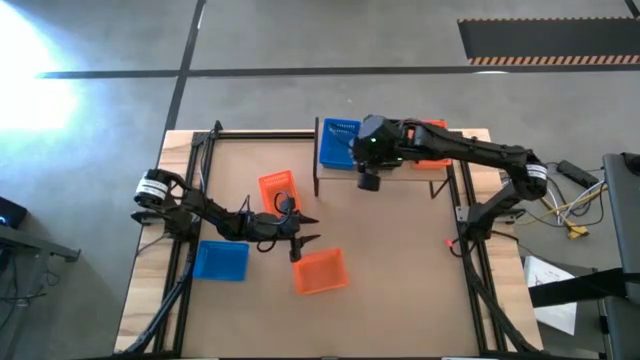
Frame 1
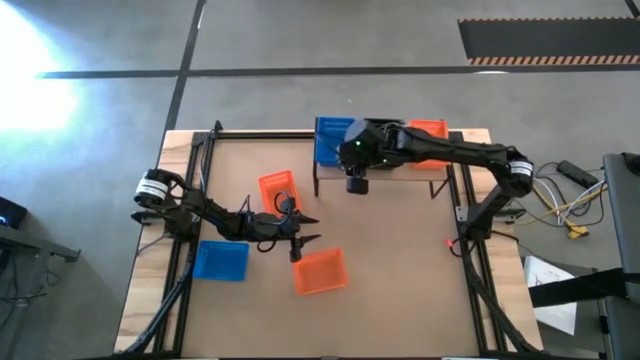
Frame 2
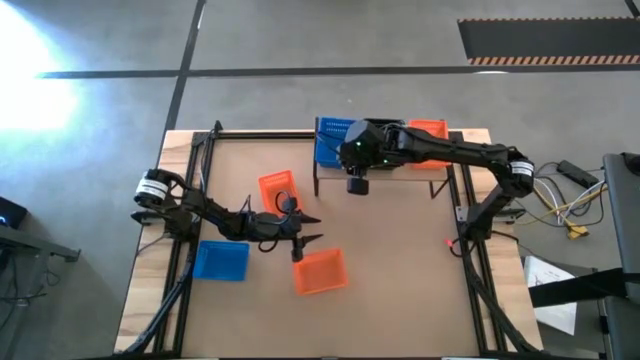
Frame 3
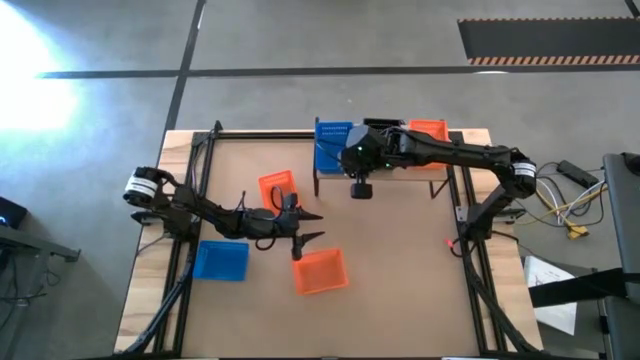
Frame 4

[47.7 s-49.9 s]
Task: Stack baskets on shelf by color
Adjust the stacked blue bins on the shelf

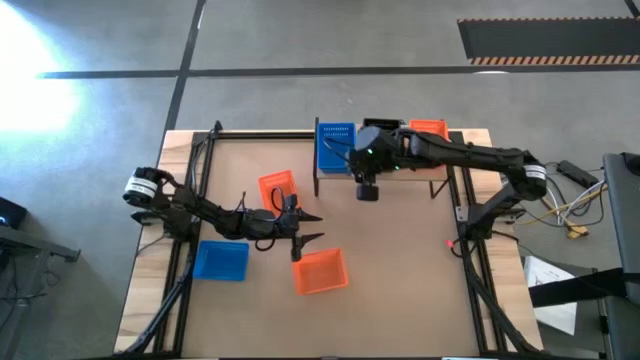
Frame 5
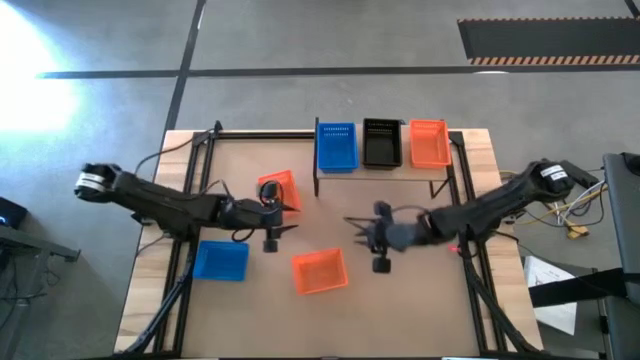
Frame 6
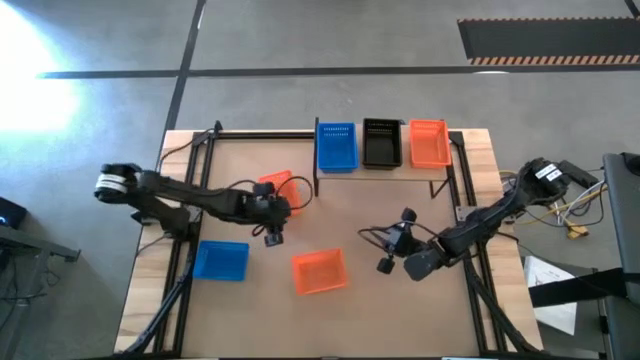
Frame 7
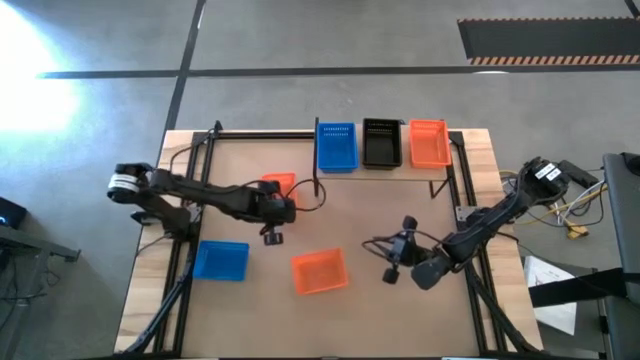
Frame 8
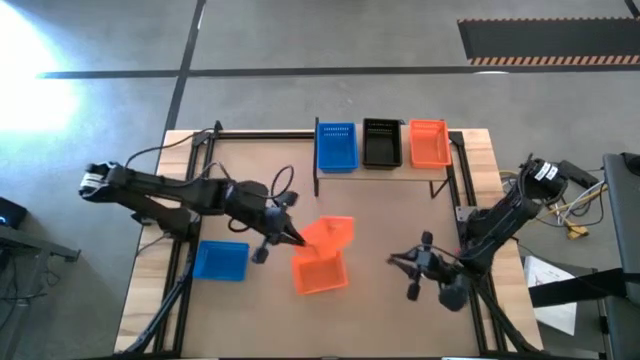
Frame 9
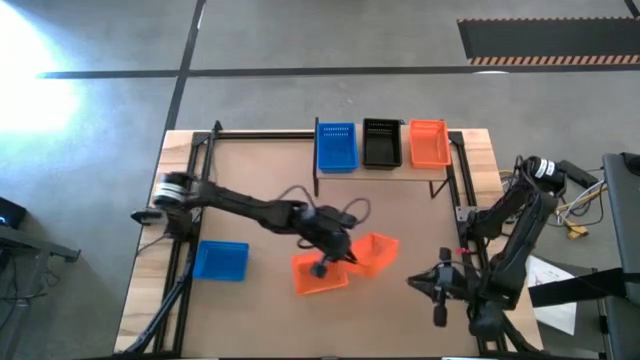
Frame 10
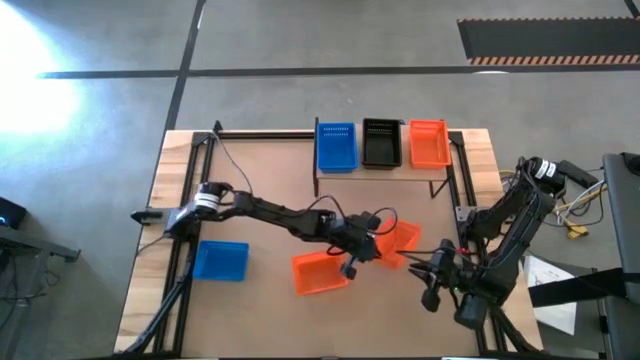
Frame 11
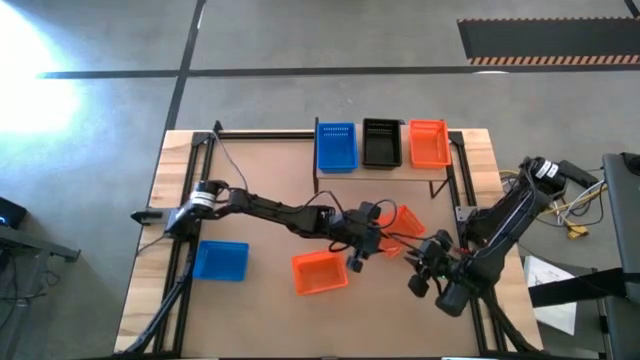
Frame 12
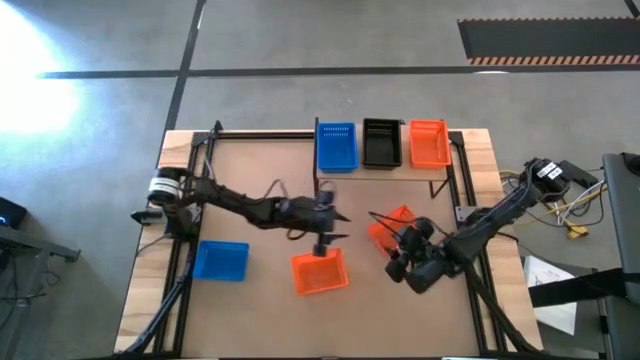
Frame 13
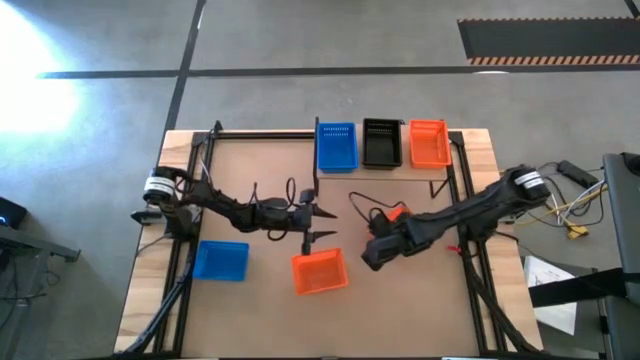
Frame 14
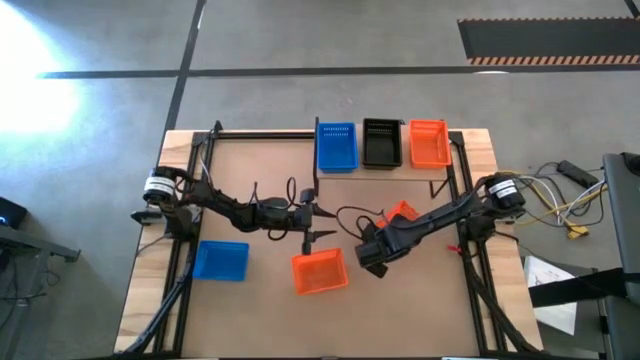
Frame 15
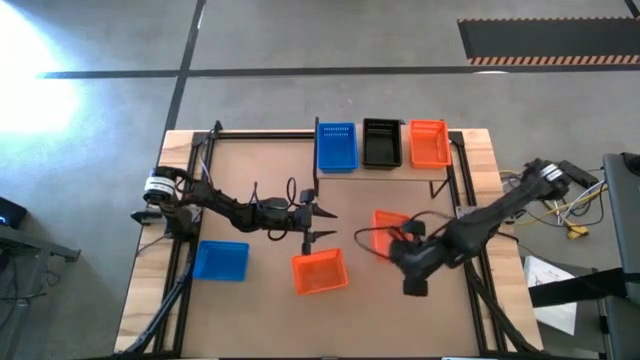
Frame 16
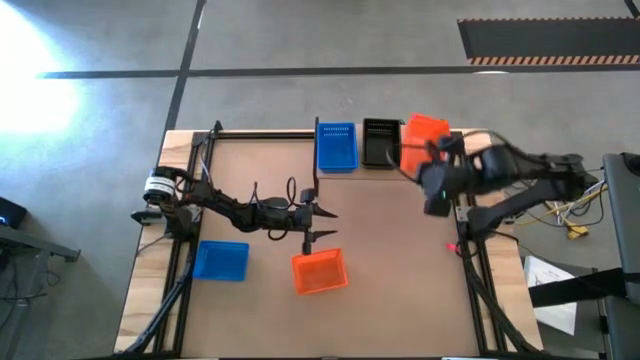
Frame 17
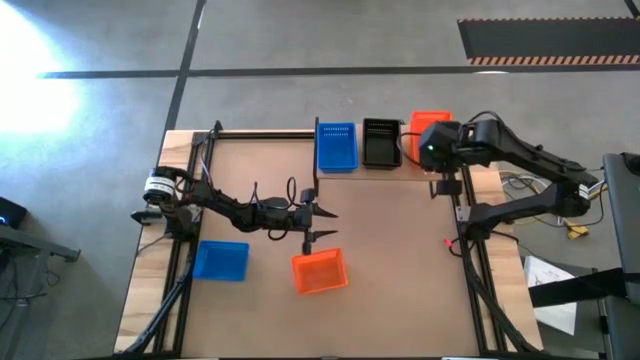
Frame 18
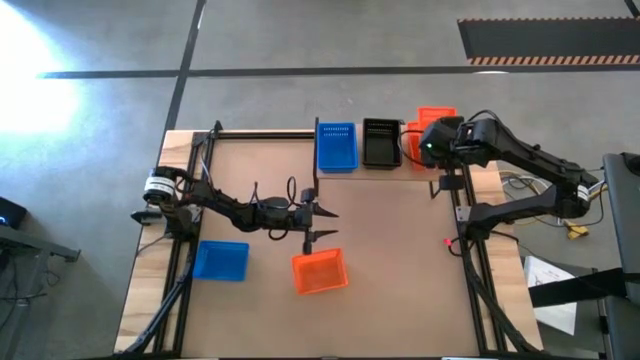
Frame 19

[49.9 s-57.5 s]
Stack the top orange bin on top of the orange bins on the shelf

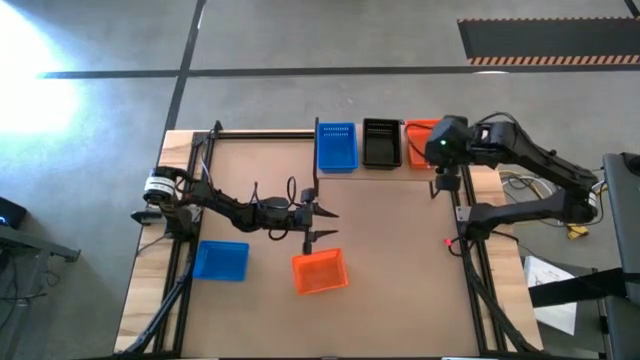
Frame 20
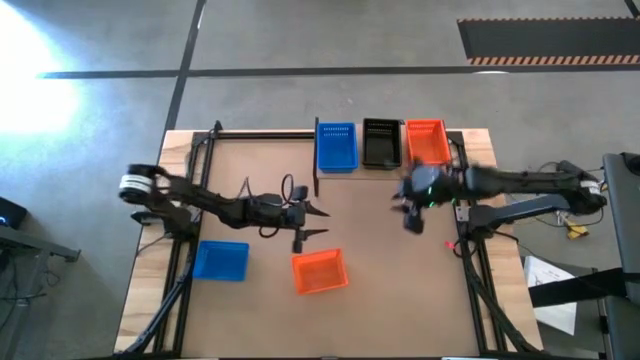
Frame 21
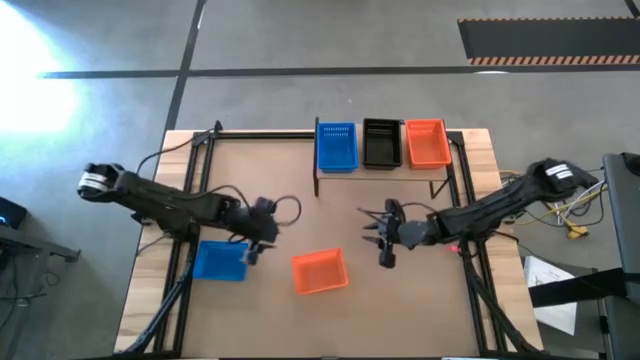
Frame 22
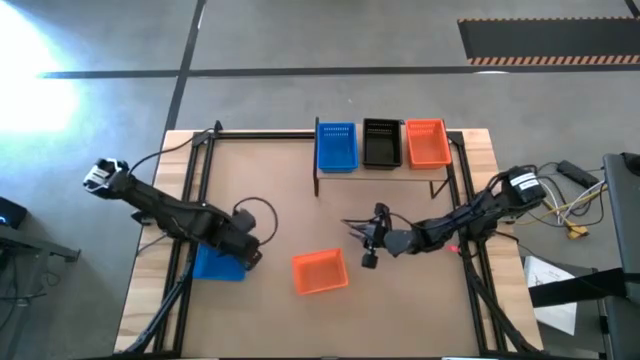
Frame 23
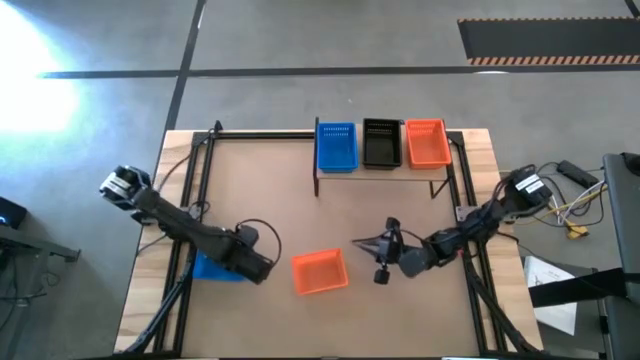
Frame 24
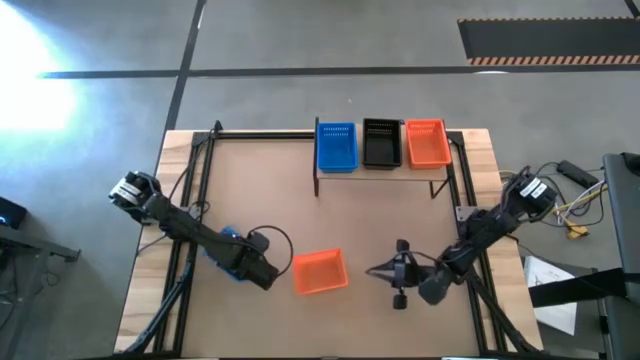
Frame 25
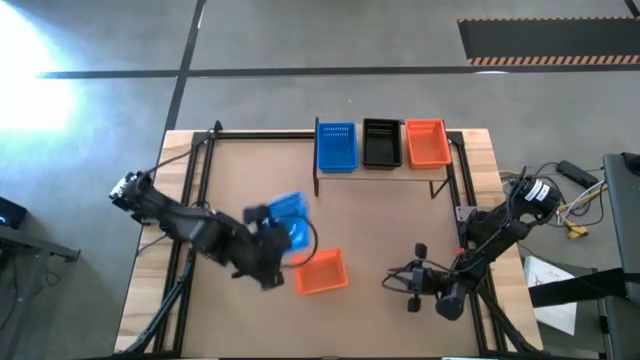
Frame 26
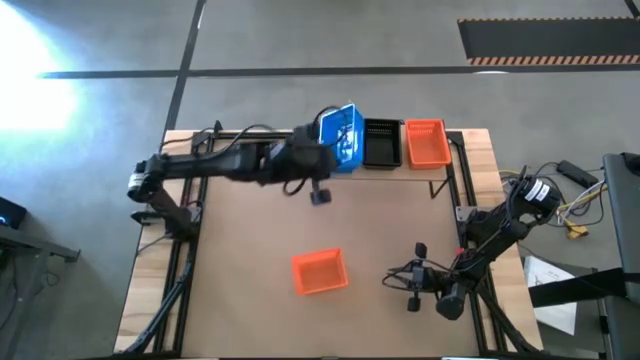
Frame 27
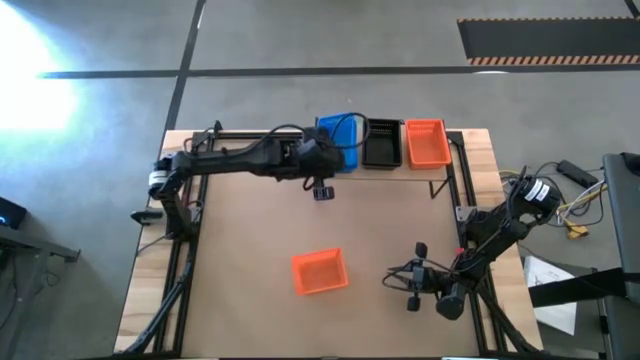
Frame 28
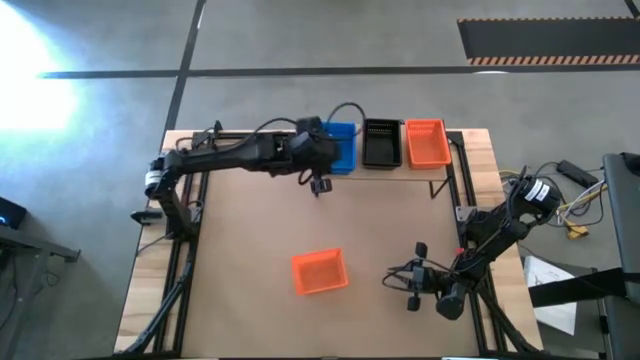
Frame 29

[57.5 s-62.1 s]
Stack the blue bin on top of the blue bins on the shelf

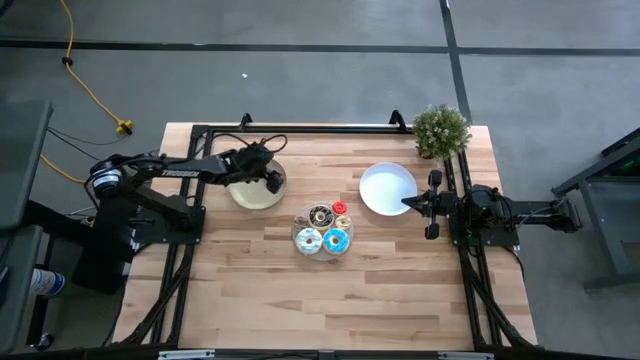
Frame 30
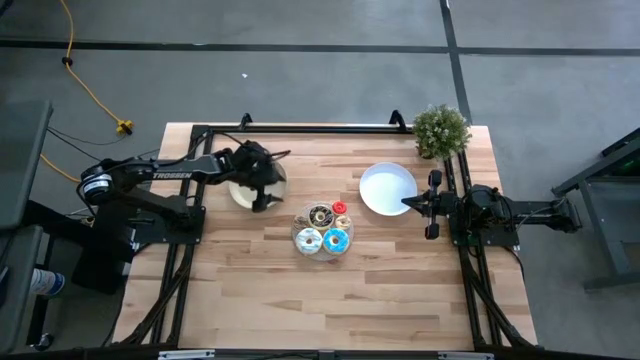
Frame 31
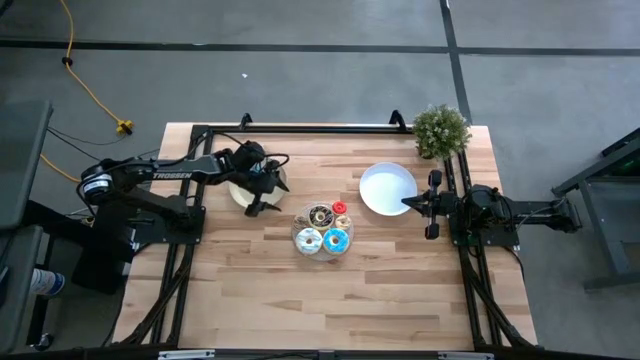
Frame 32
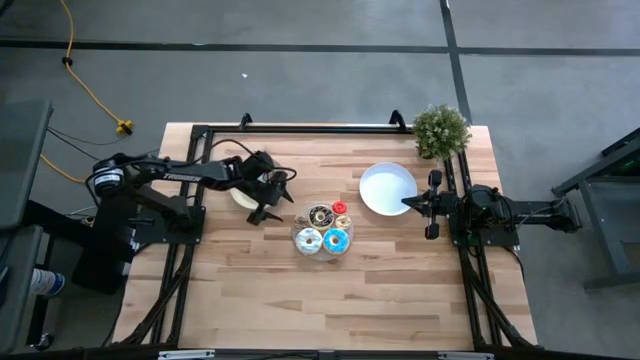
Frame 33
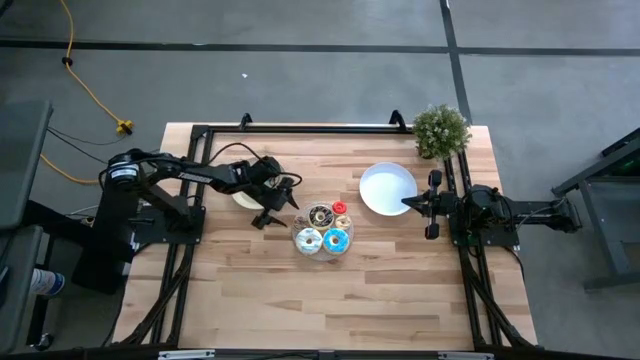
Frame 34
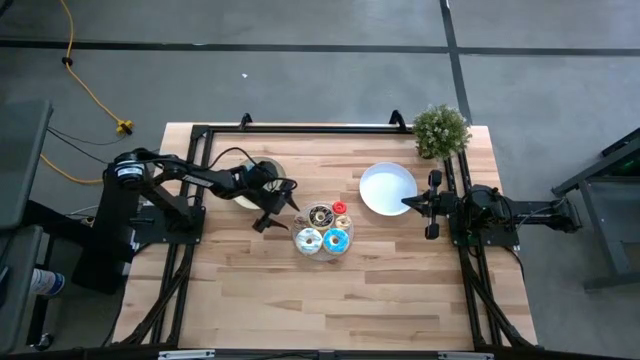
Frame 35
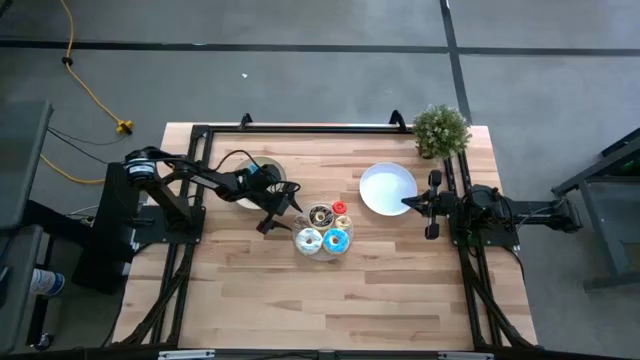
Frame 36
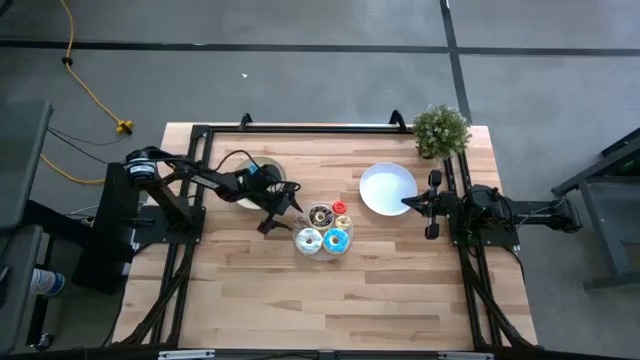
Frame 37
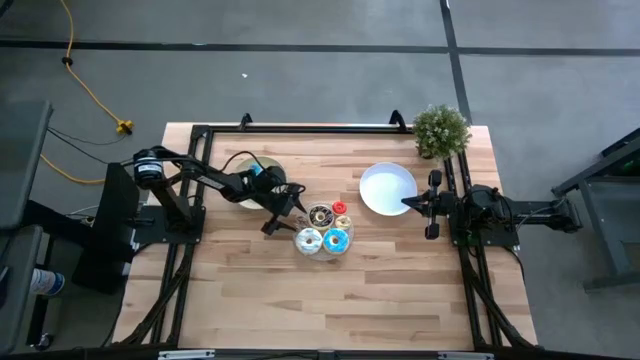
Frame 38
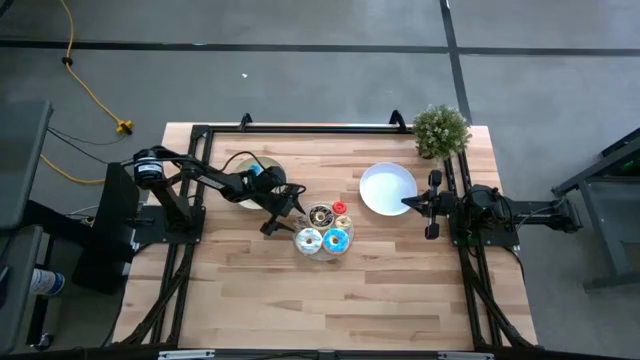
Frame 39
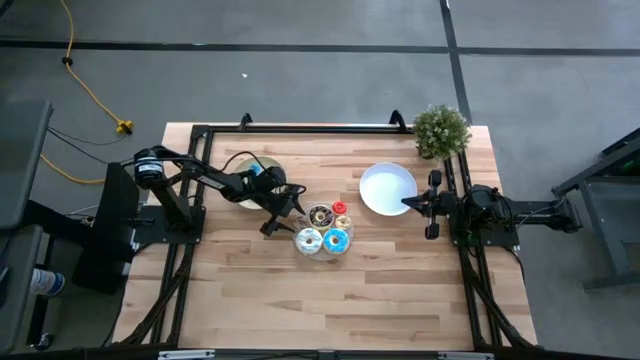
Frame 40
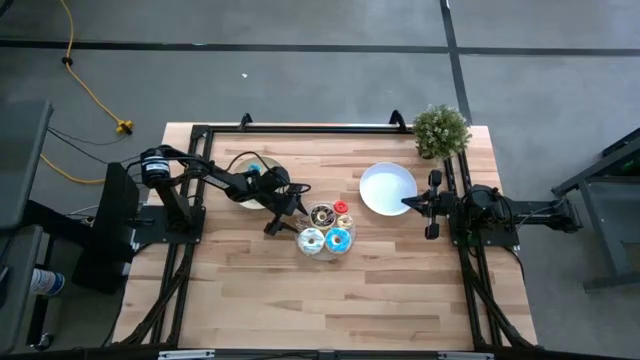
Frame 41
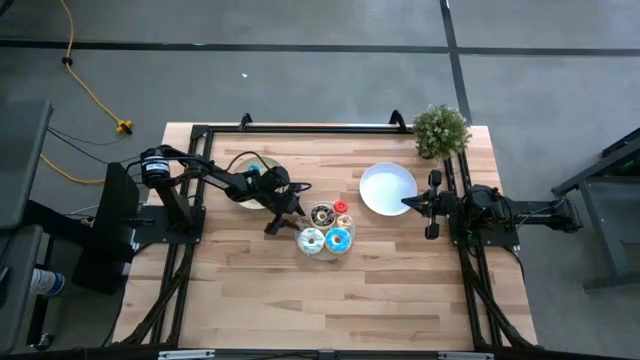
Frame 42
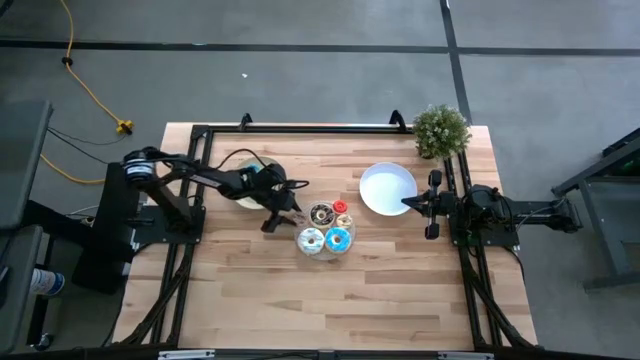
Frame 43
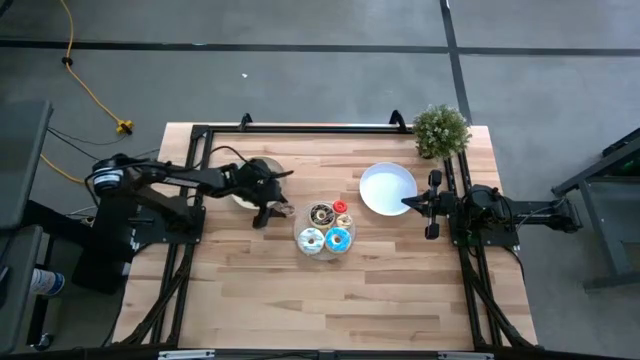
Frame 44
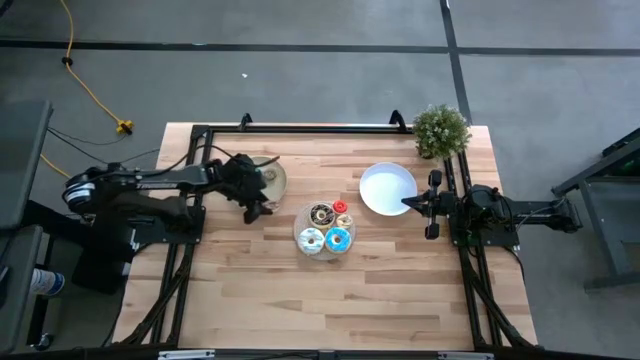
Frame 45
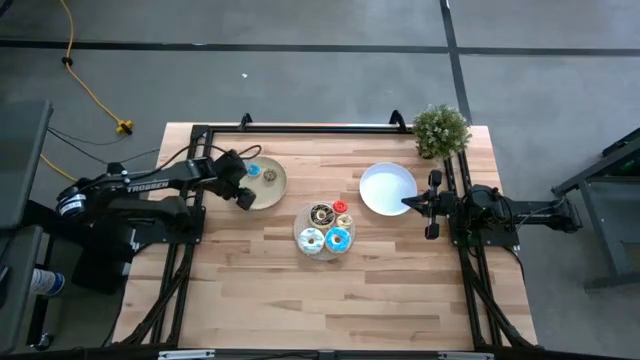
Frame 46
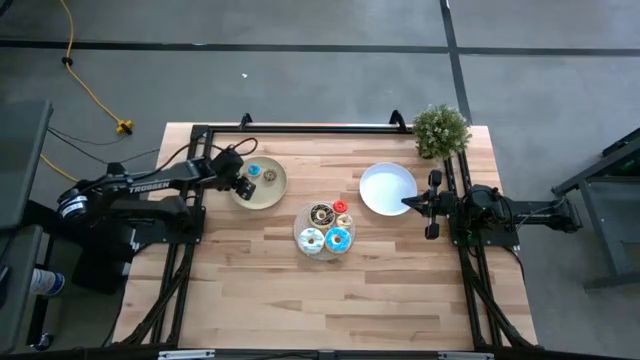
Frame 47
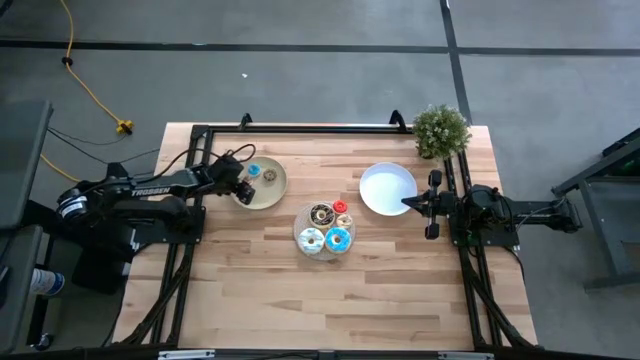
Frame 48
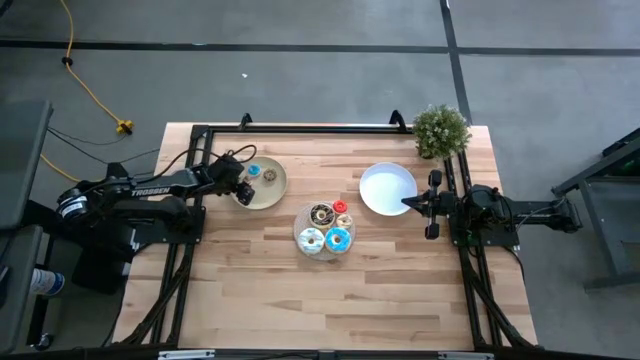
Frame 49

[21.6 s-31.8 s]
Task: Pick & Place donuts
Put the small brown donut on the brown plate
